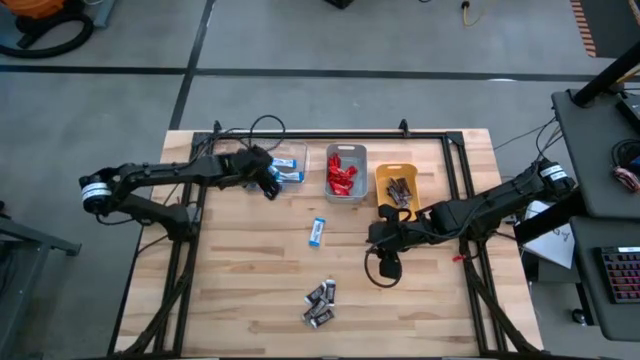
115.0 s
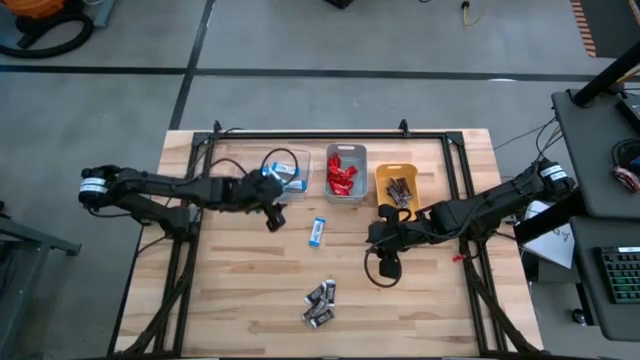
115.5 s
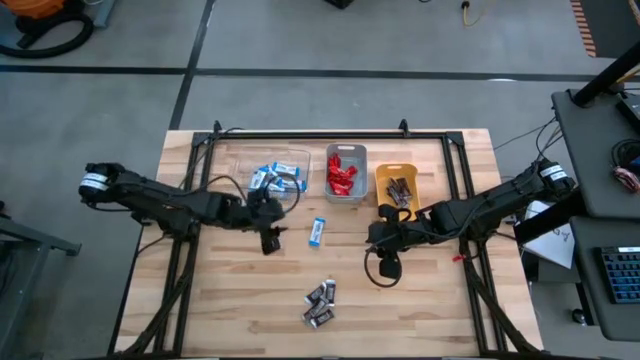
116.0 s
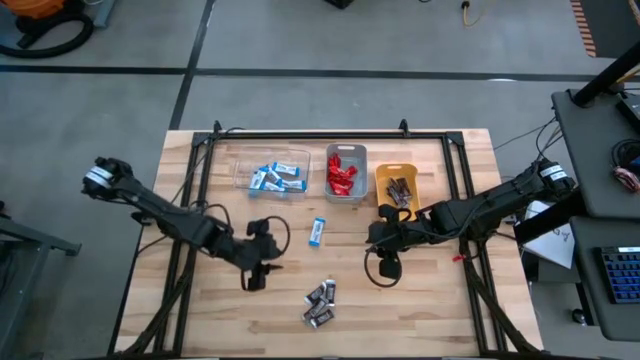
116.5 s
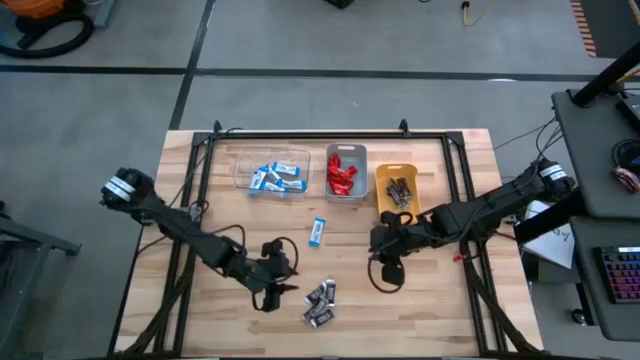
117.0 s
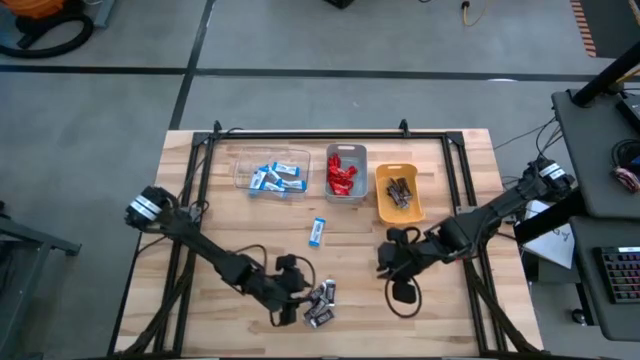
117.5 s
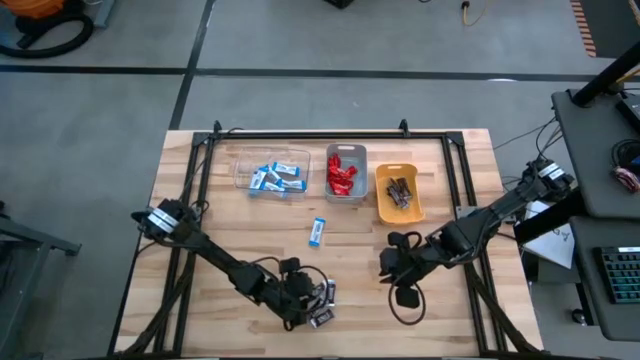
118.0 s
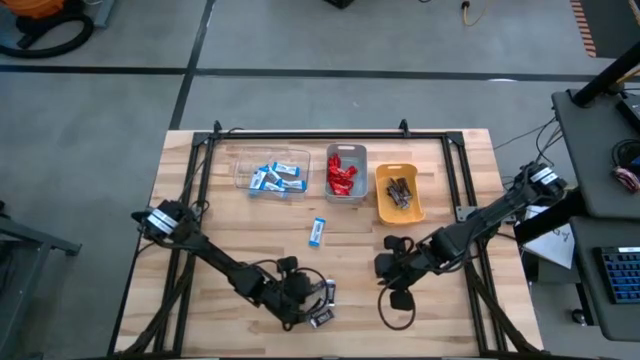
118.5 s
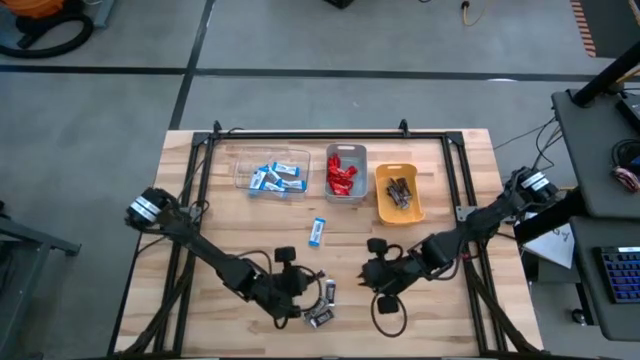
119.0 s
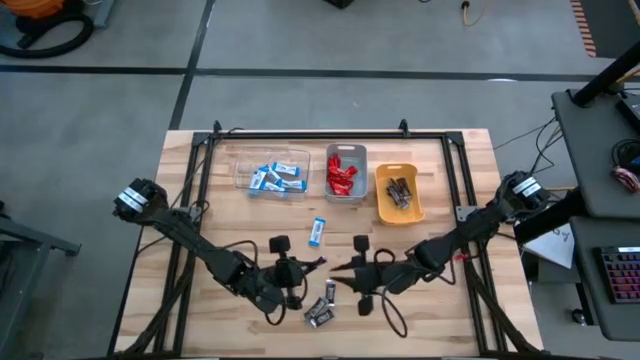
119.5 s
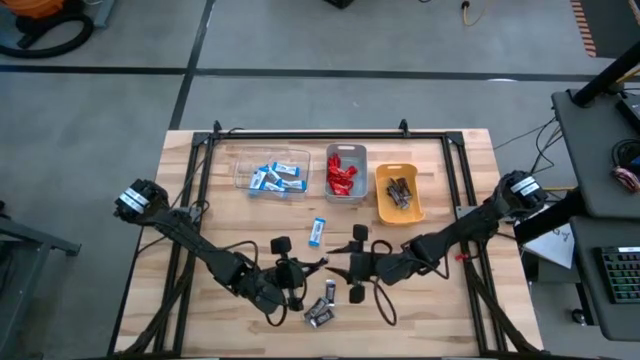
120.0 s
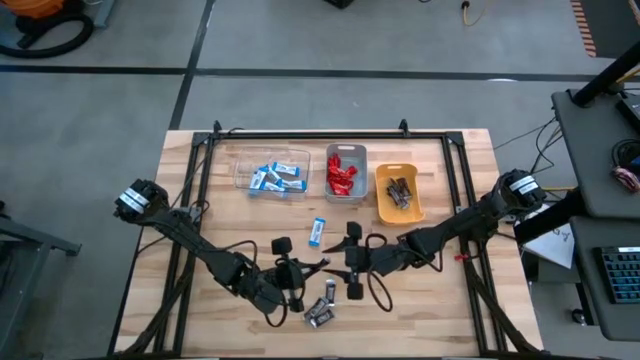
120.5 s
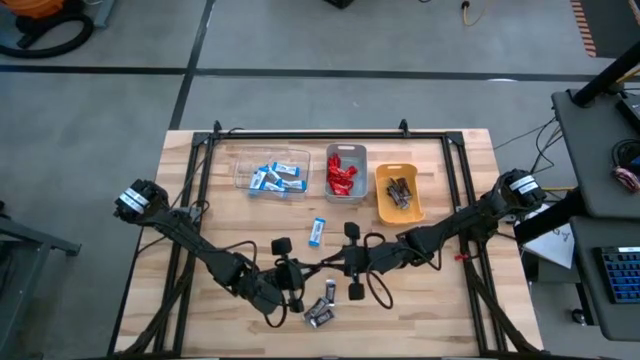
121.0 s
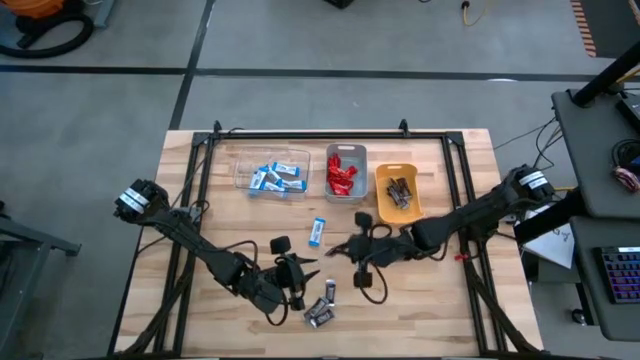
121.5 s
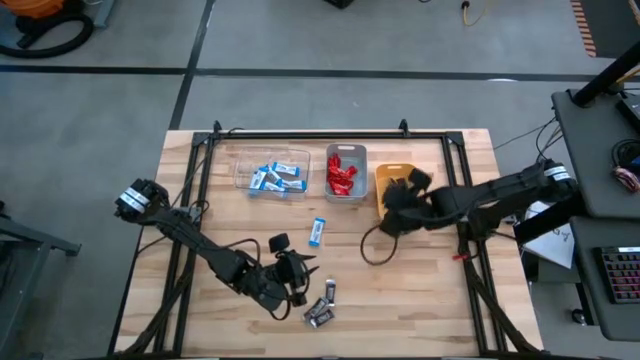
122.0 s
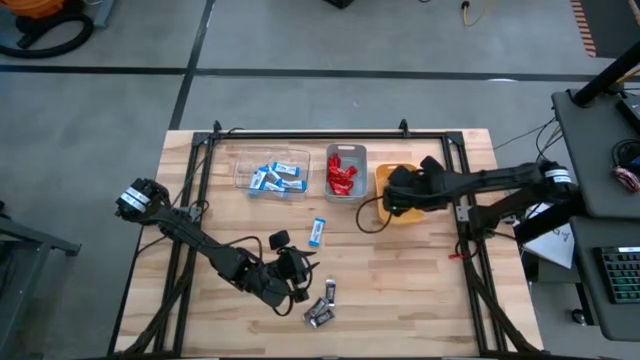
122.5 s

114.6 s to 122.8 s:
Task: Organize candy in baskets
Put the brown chocolate into the yellow bin

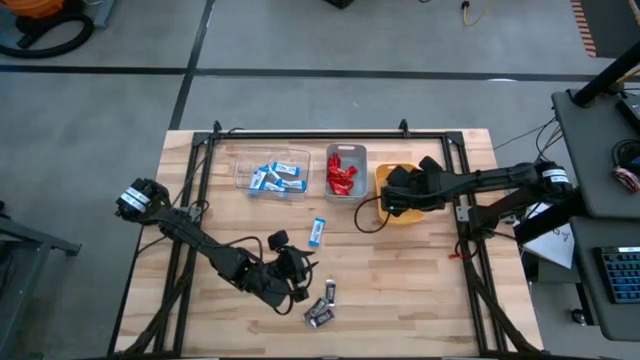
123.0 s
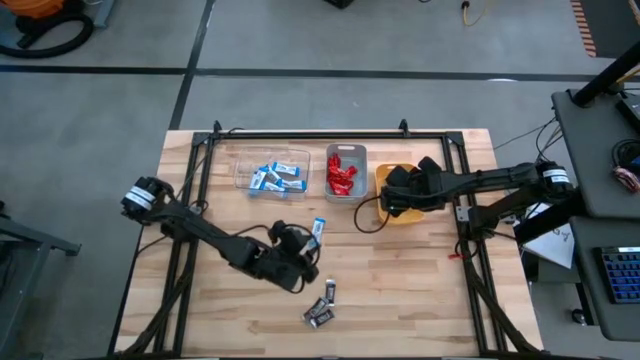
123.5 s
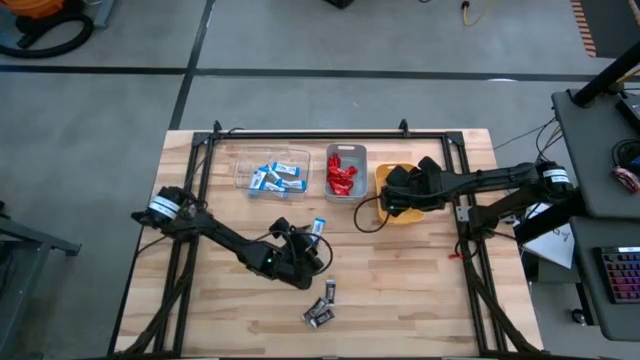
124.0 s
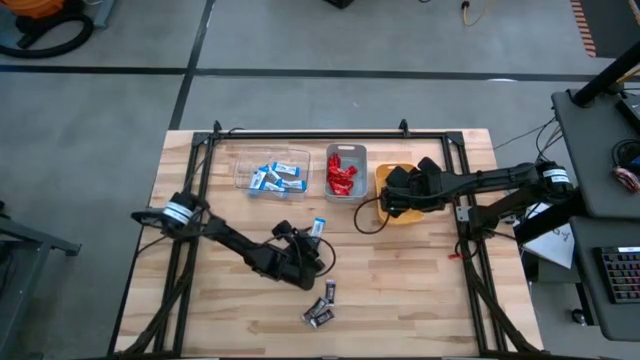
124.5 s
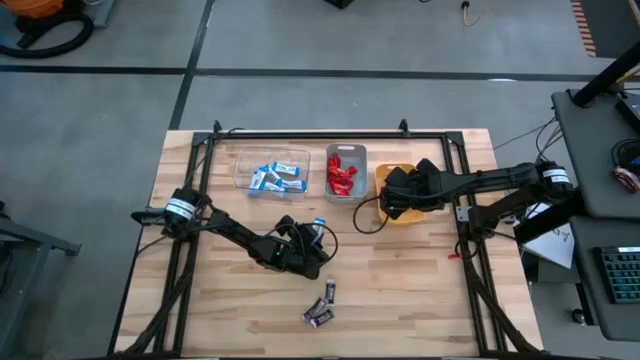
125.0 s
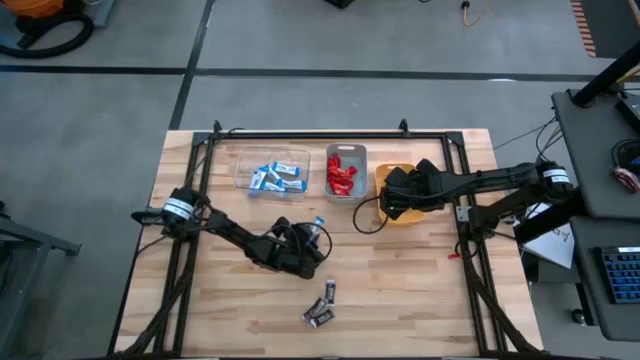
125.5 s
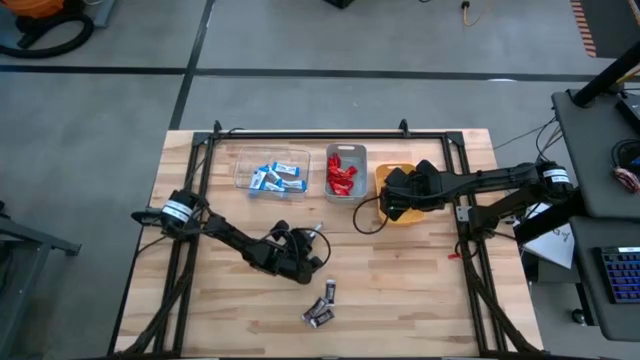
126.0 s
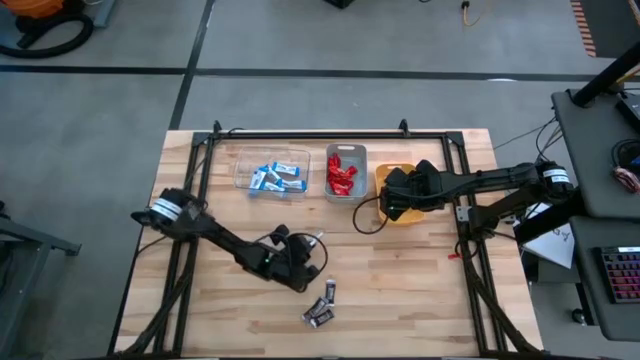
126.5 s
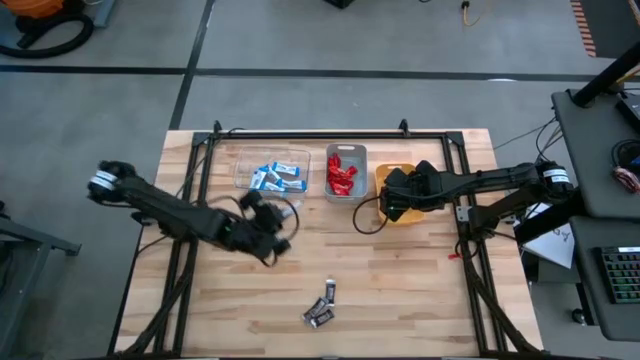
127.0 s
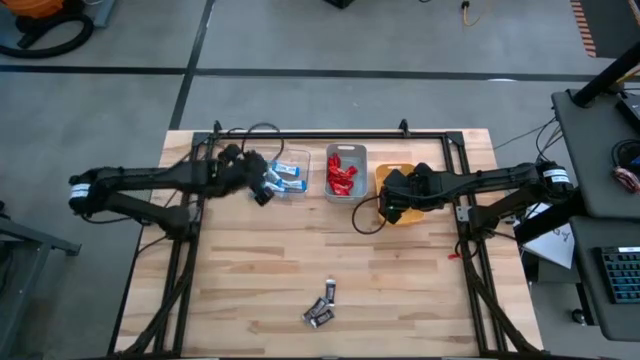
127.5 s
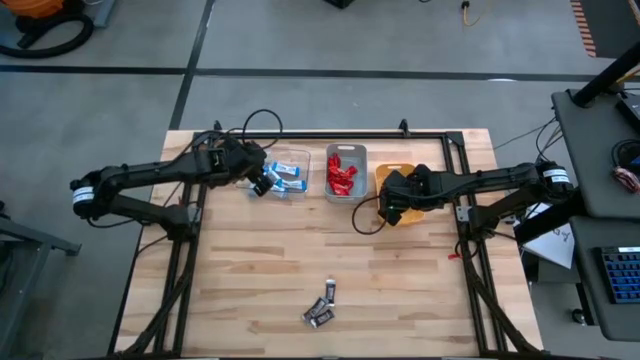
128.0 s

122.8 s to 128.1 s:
Put the white chocolate into the transparent bin

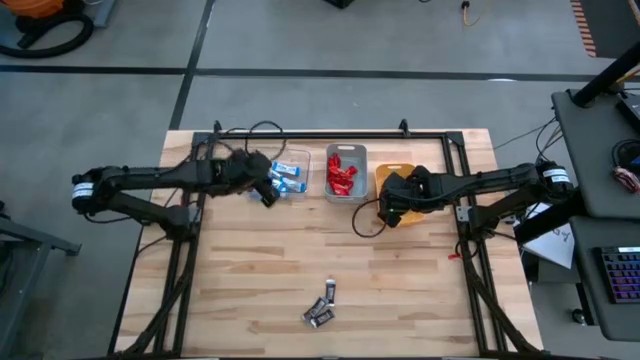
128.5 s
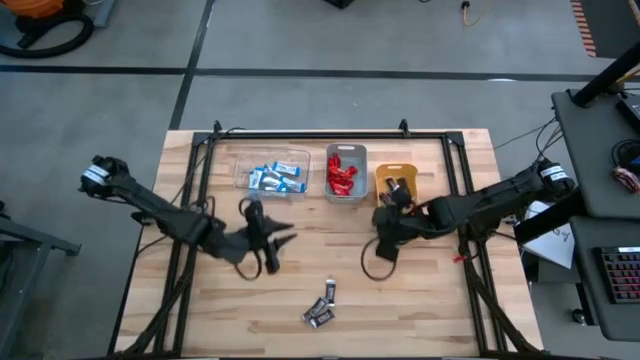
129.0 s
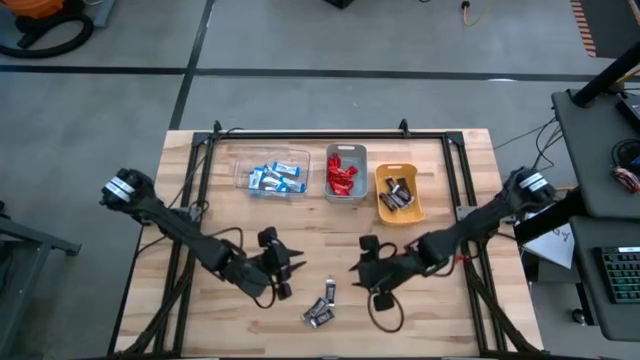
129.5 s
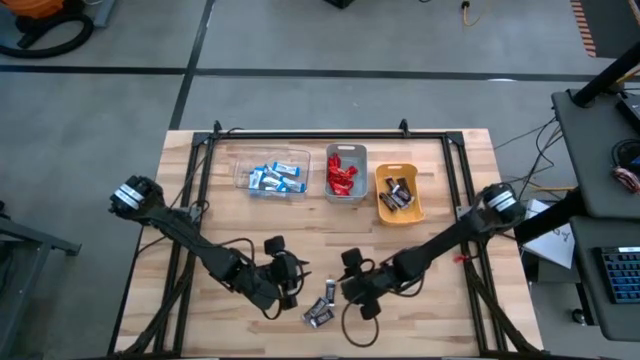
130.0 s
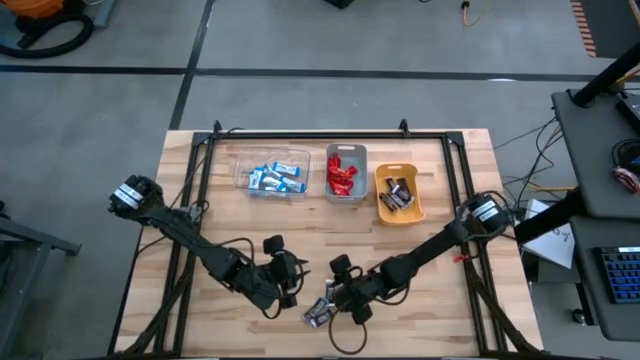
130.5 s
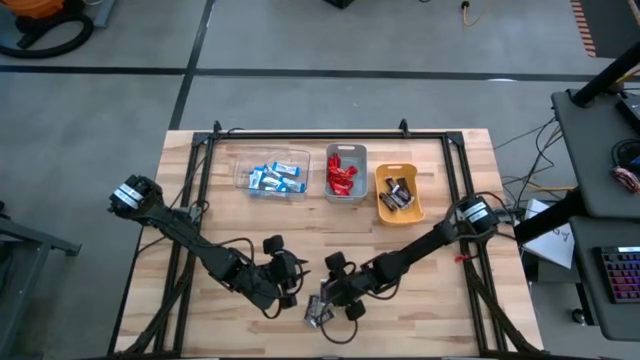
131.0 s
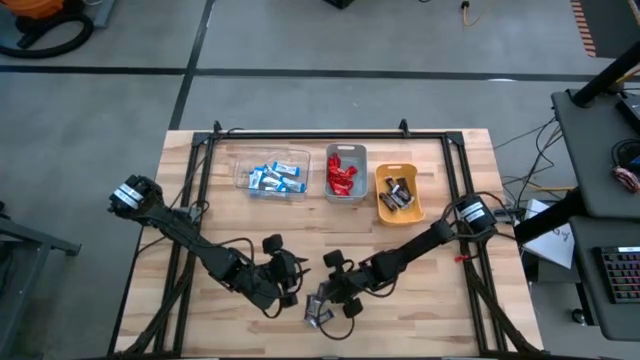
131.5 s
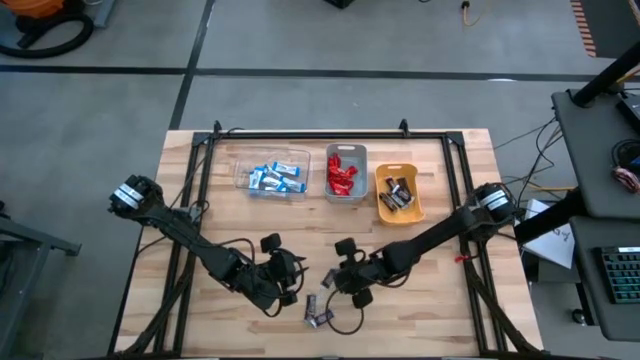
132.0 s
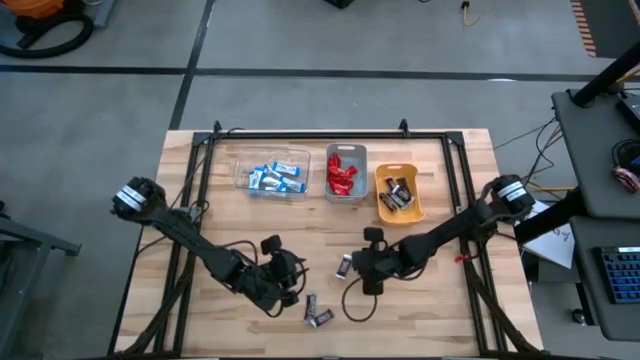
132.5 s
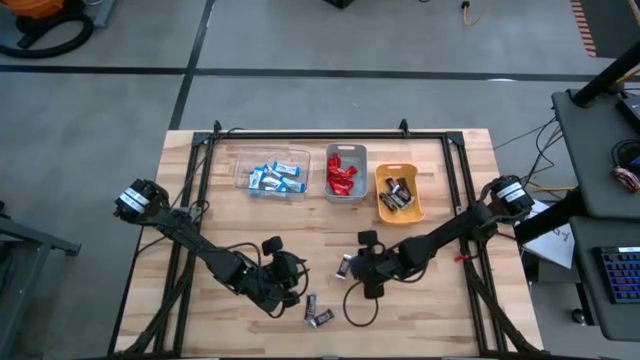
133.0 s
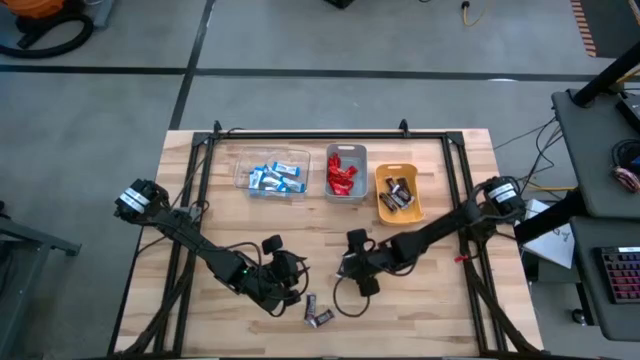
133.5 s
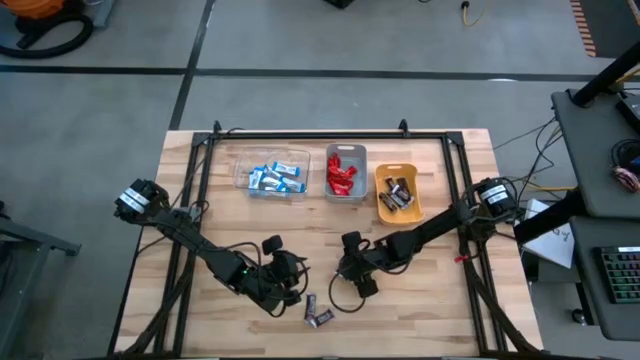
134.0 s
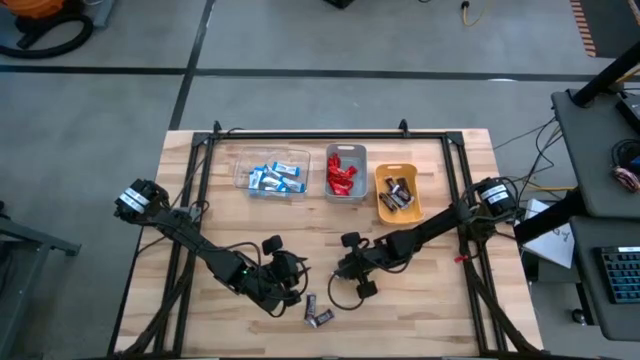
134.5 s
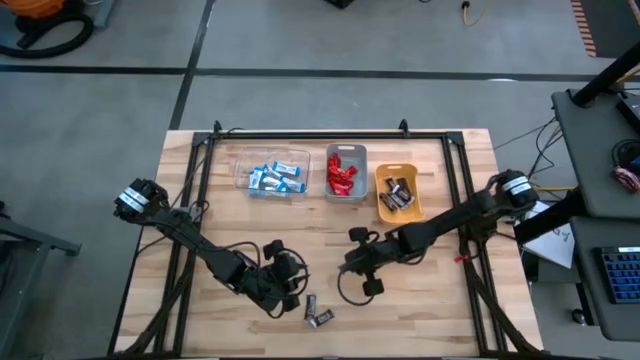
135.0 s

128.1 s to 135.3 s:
Put the brown chocolate into the yellow bin

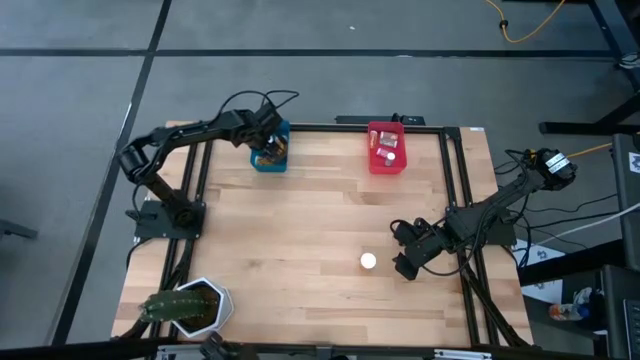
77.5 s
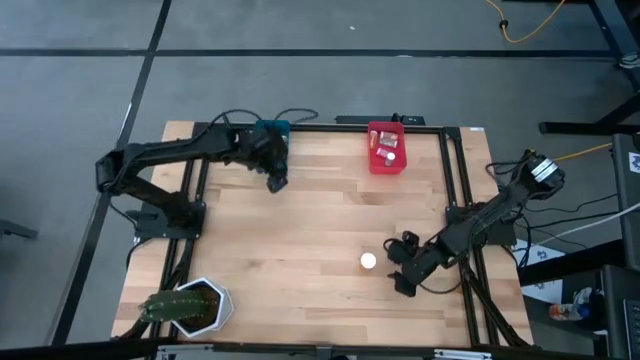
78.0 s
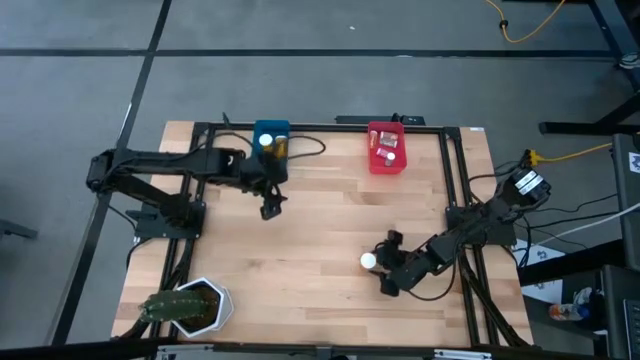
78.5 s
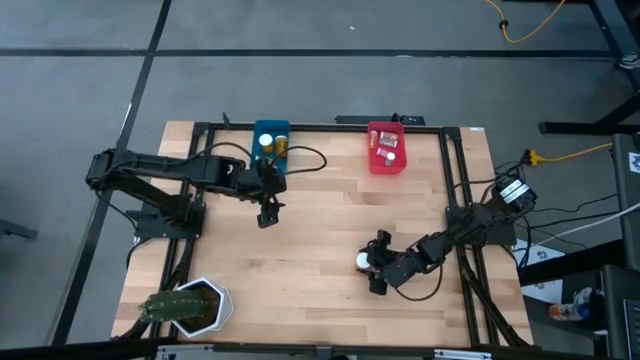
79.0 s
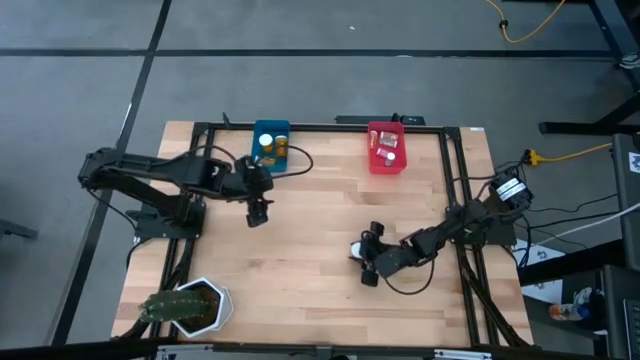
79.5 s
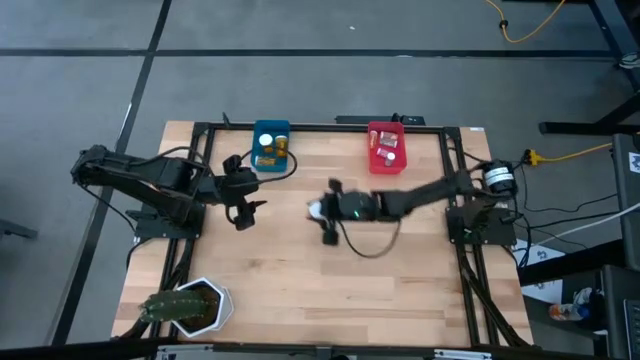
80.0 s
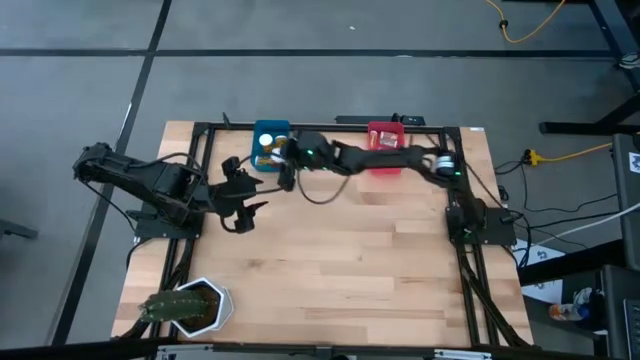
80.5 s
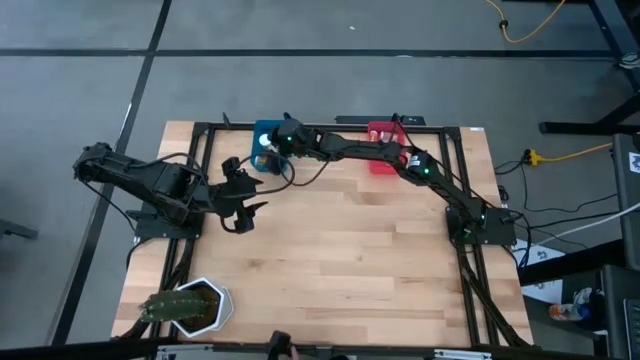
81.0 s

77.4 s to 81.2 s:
Task: Pick and place medicine bottles into bin by pill shape (circle, oval)
Put the big orange pill bottle into the blue bin
